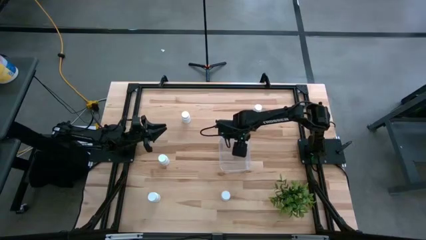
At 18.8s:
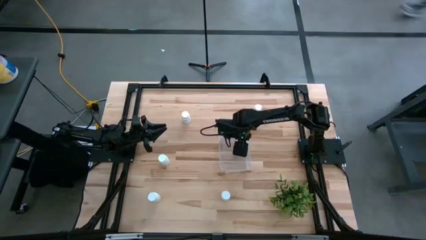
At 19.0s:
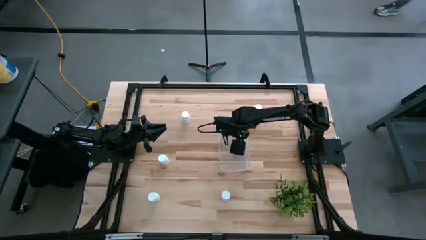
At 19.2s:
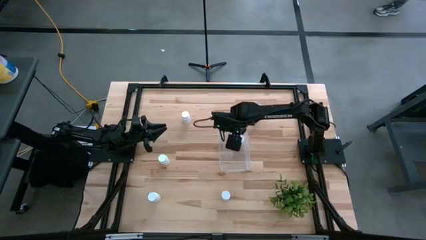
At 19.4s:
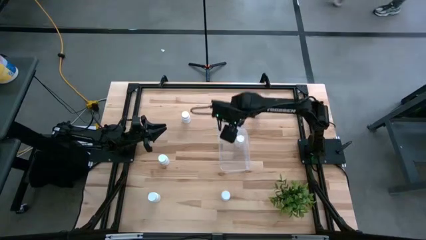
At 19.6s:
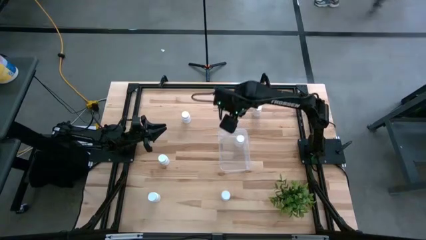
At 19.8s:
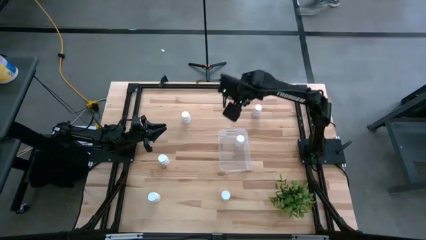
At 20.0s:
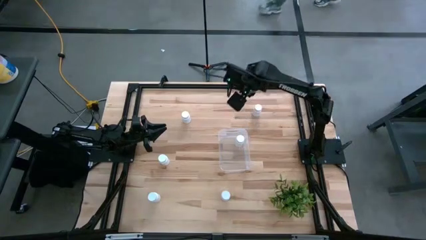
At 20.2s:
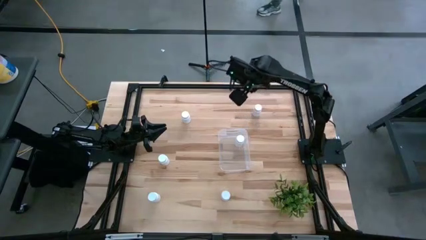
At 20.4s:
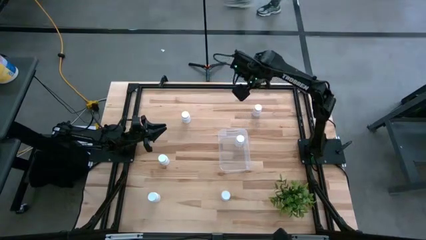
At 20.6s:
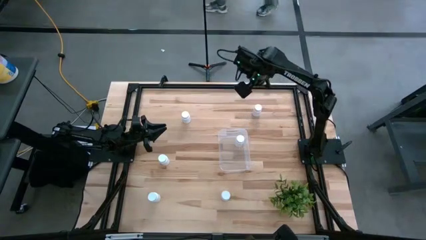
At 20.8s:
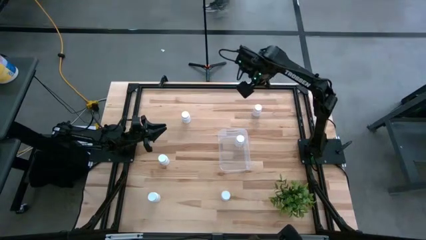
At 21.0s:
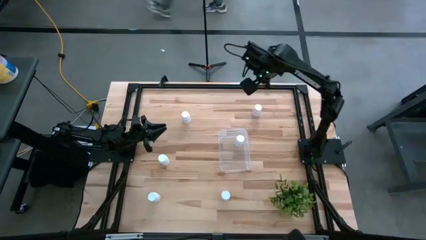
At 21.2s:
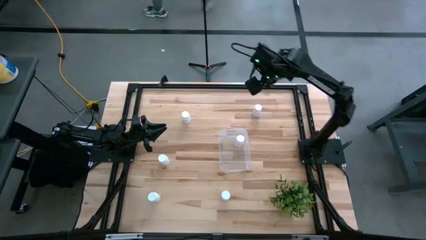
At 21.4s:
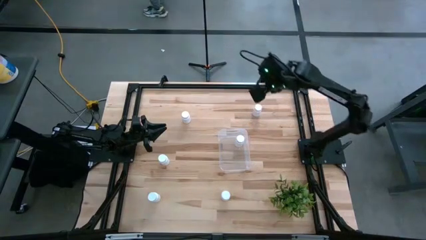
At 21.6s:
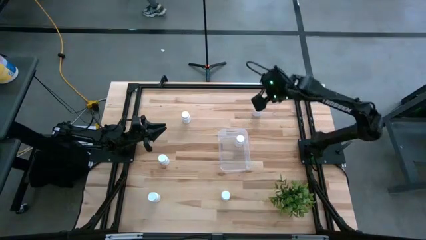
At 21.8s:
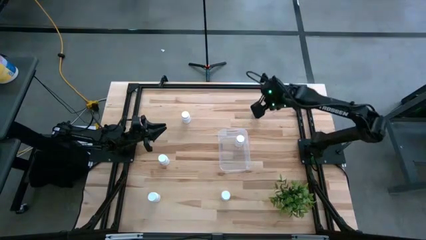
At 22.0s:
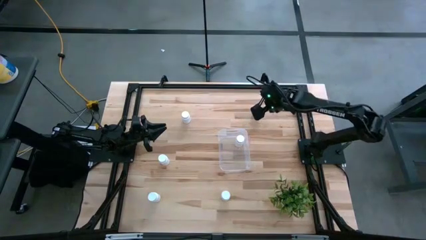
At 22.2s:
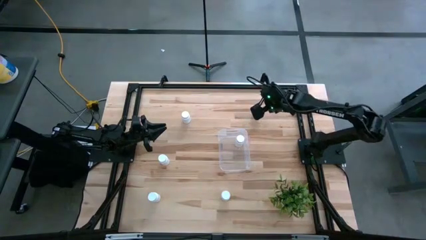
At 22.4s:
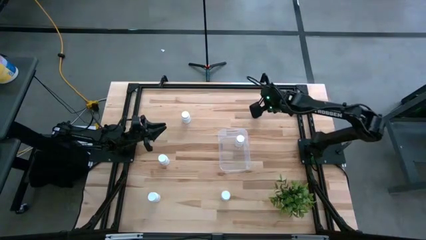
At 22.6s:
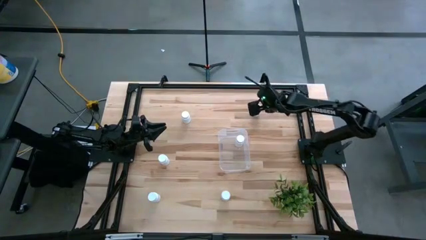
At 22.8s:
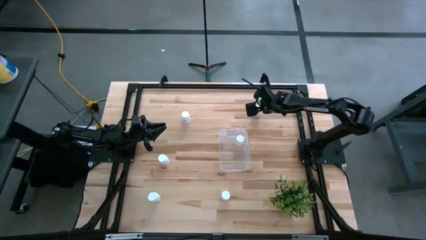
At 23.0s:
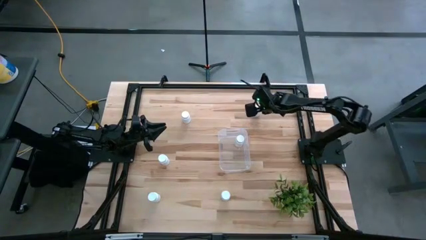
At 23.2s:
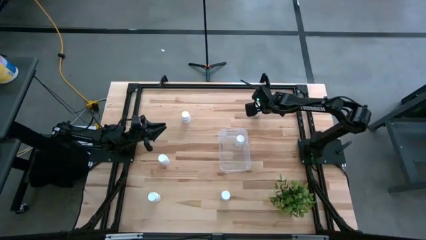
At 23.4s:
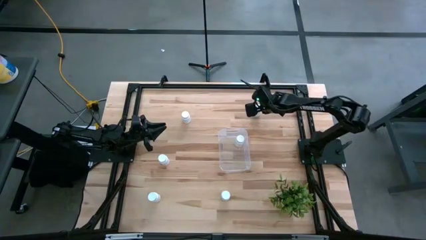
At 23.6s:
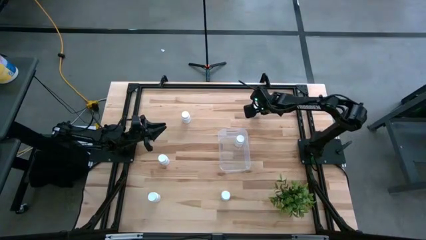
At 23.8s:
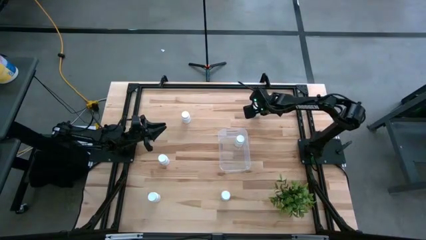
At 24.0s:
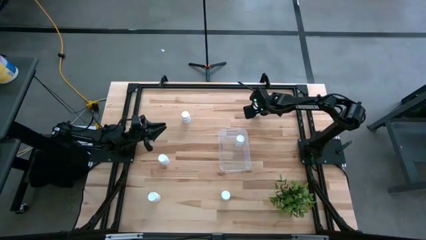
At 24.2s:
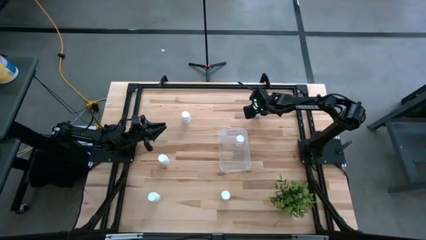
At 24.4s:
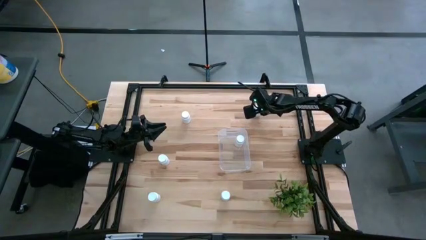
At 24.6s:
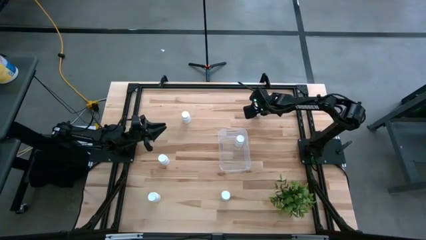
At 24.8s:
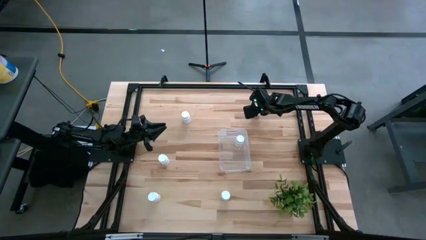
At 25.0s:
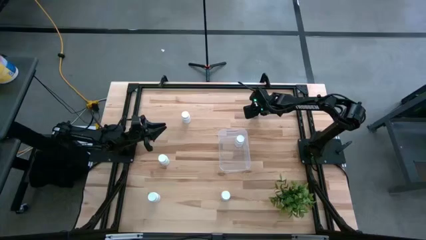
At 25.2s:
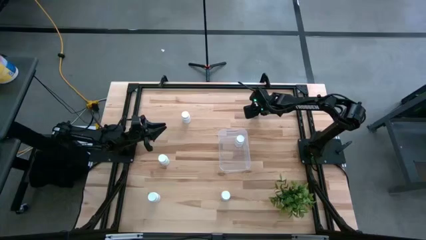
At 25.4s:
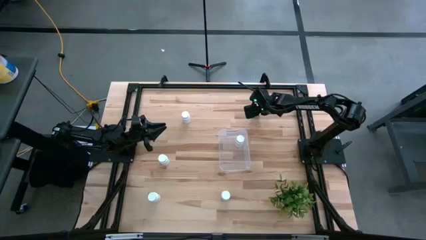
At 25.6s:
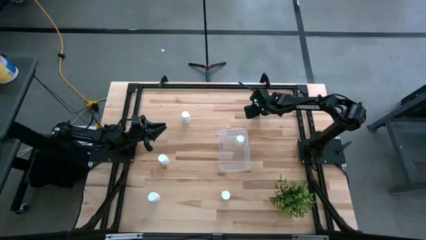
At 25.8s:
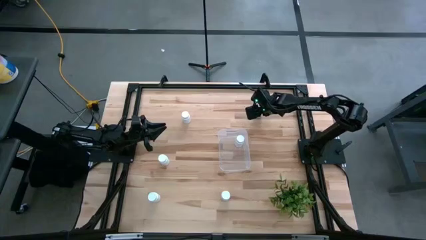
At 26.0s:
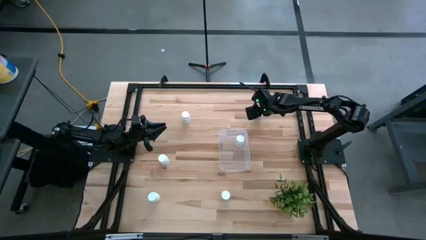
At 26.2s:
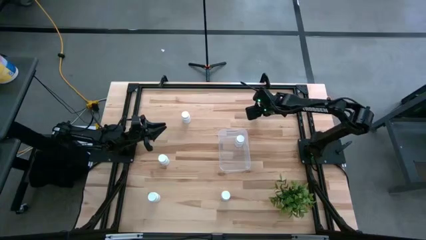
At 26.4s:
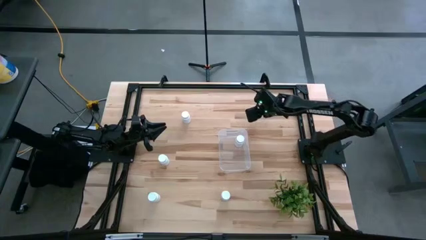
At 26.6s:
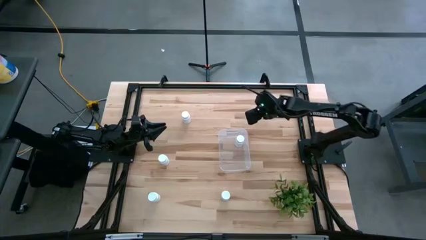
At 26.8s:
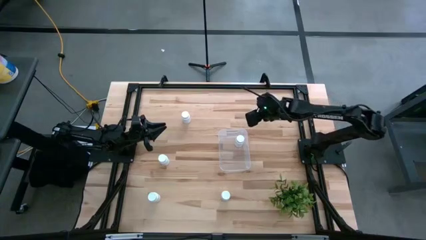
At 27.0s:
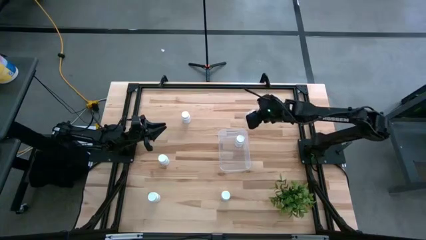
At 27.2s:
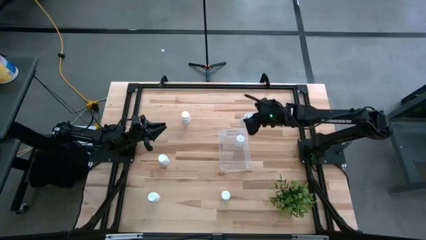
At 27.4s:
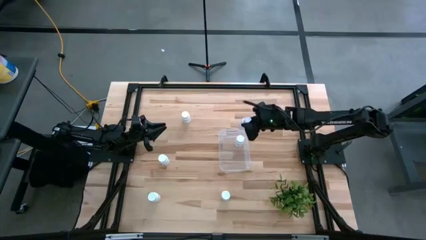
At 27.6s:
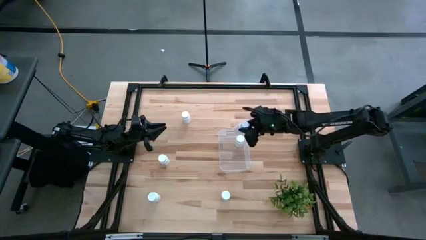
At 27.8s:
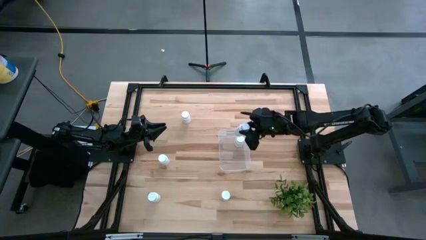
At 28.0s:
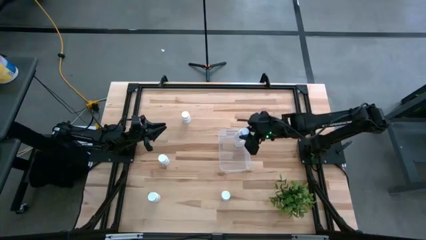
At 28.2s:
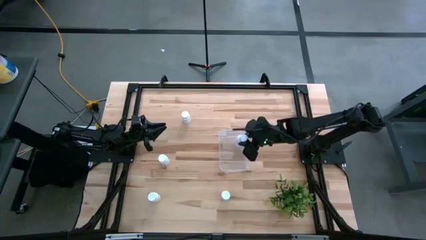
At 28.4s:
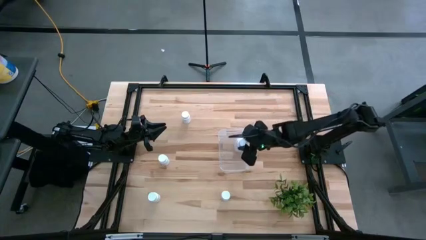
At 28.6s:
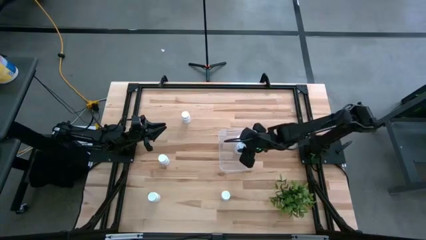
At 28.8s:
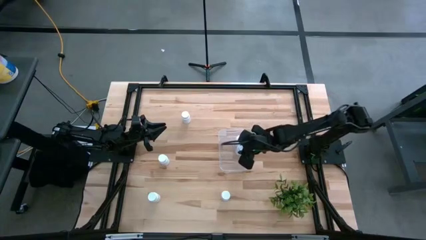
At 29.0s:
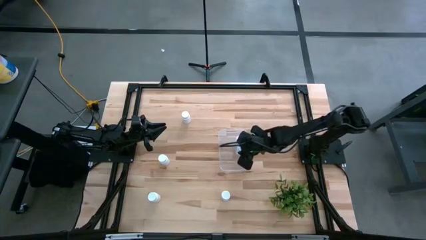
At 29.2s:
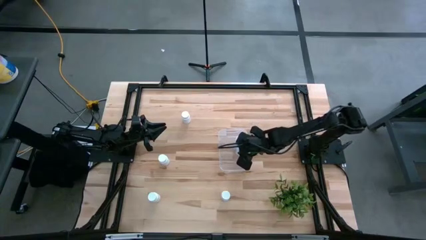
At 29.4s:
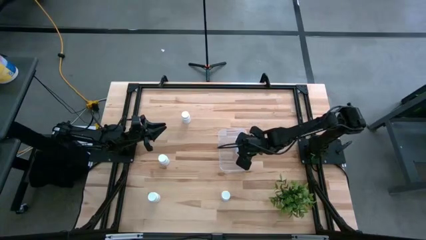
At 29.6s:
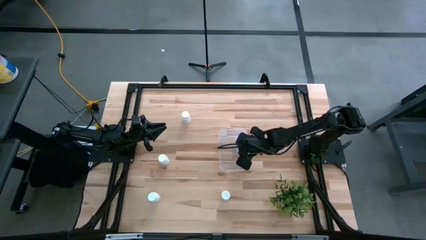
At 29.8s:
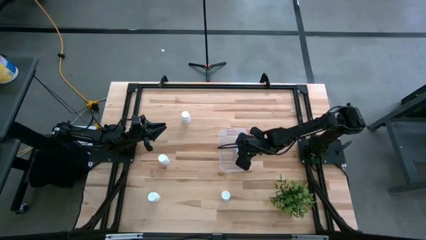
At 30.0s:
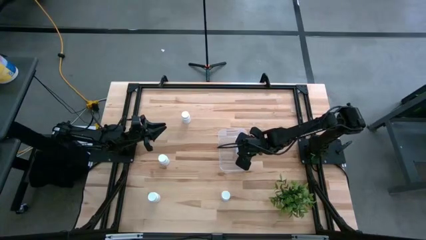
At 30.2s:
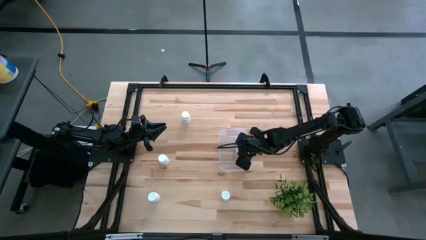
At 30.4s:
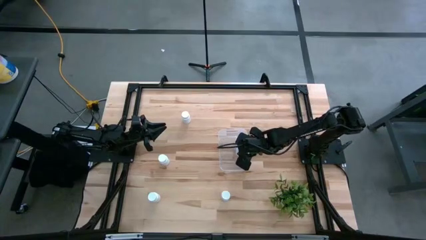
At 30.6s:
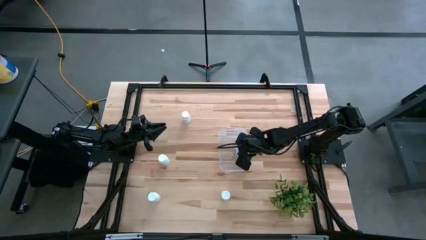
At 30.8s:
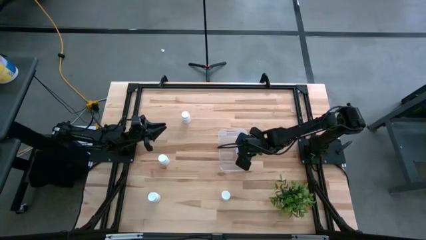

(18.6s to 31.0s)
Task: Pick and place pill bottles into a basket
Put the pill bottle into the bin

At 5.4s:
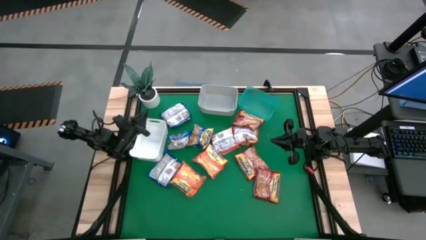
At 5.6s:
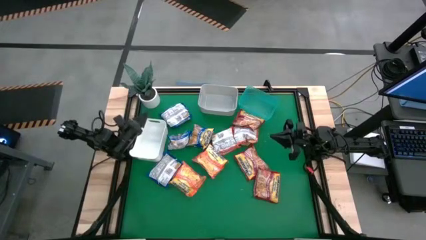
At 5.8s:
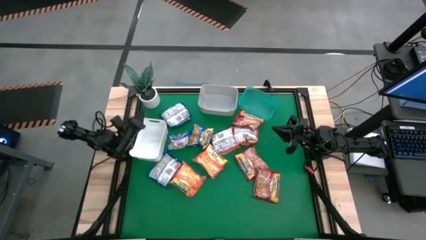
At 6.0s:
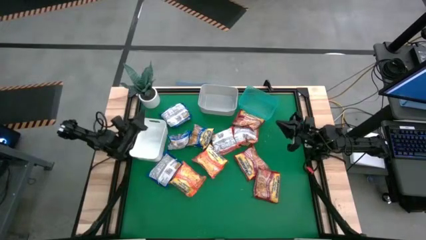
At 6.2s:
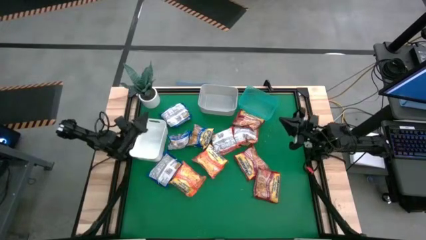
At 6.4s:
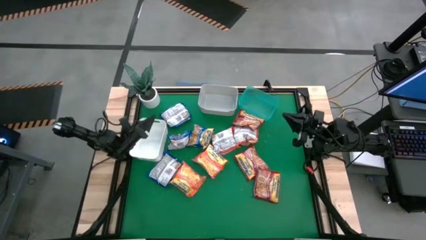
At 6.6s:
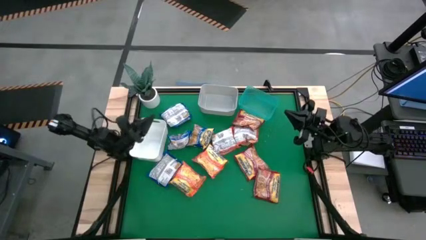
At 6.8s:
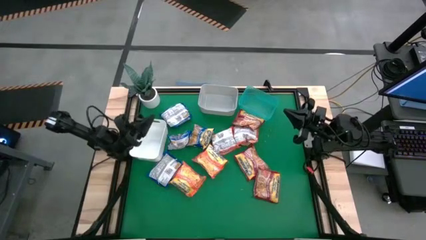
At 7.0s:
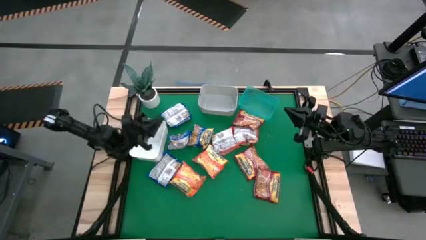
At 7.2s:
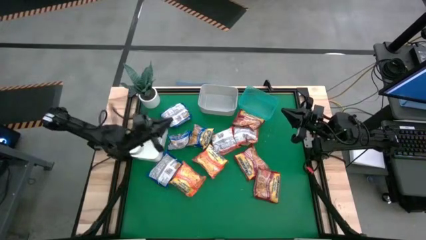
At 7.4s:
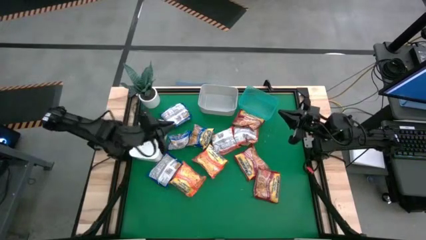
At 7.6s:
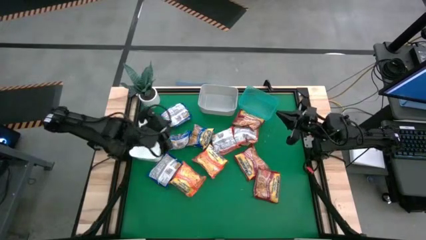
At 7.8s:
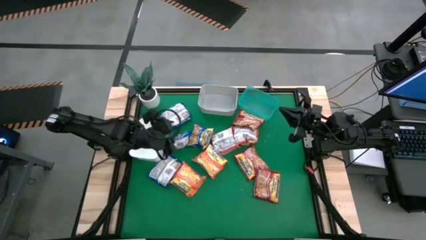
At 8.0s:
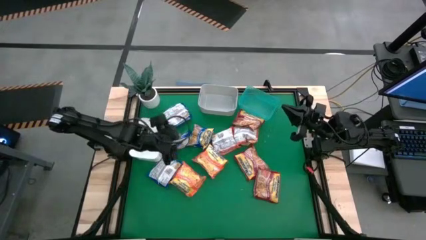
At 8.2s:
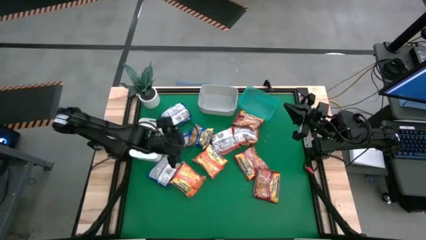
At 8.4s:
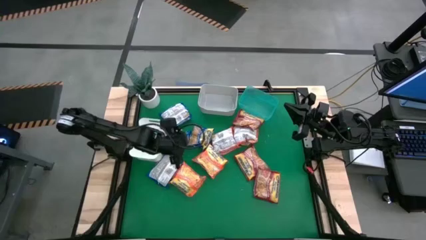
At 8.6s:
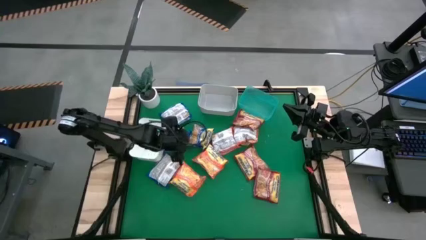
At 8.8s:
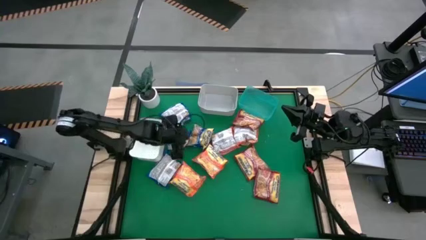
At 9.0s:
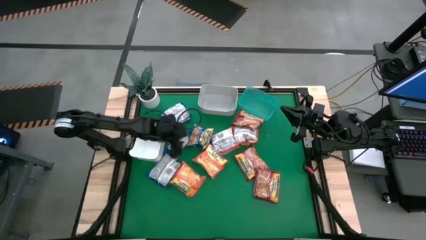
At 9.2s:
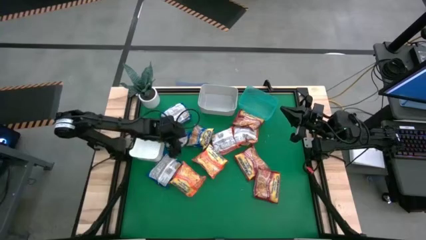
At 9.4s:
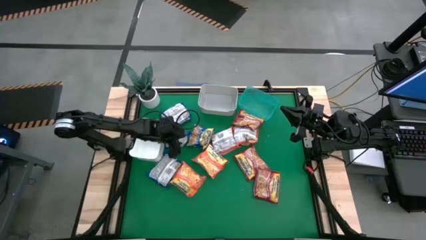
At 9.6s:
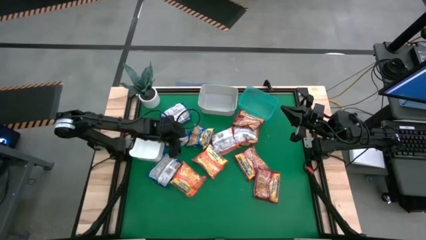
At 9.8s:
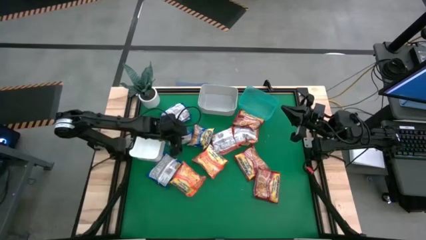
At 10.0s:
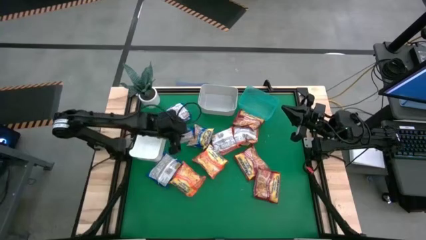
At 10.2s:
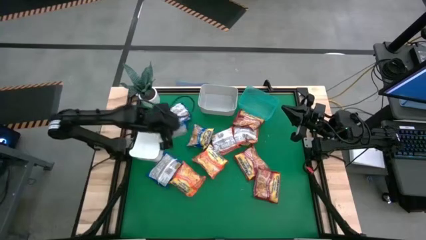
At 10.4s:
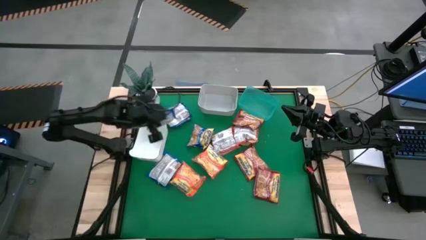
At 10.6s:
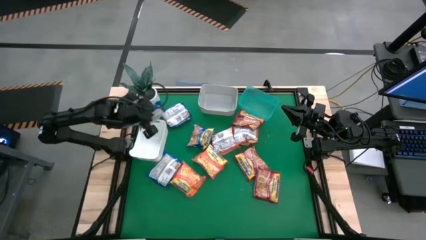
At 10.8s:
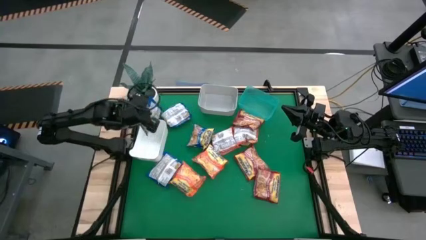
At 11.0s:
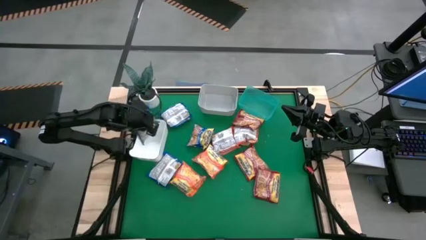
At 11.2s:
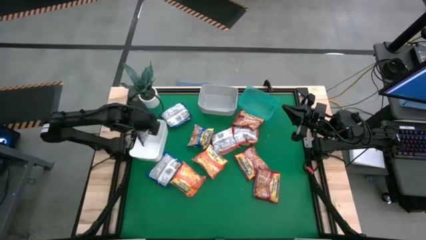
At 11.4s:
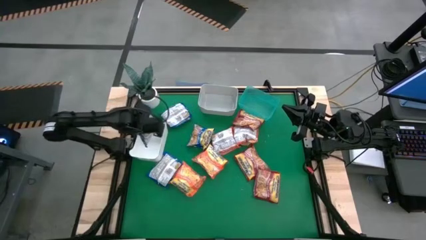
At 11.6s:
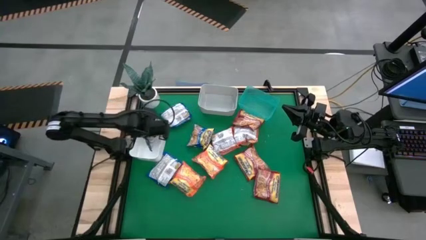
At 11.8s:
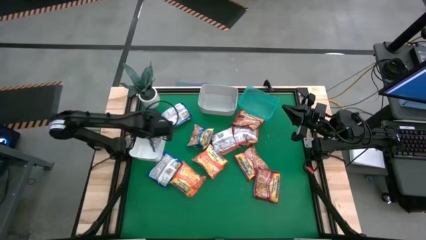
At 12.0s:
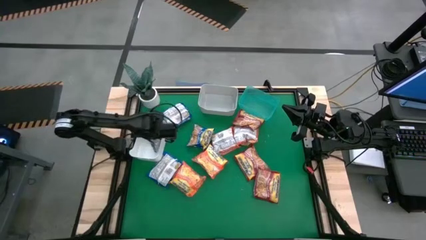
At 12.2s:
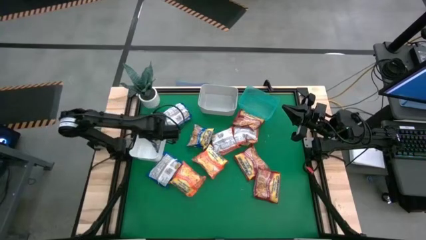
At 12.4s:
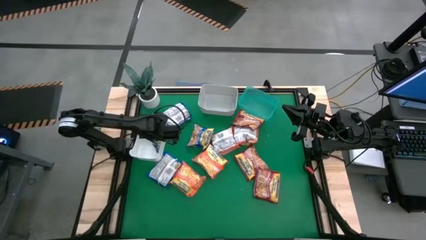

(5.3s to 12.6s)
Task: Sort Maruchan noodles
Put the blue noodle pack into the white bin
